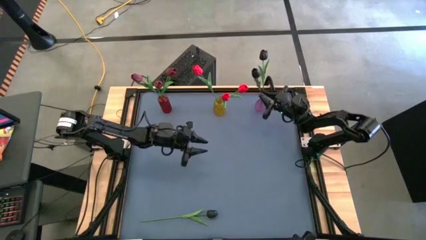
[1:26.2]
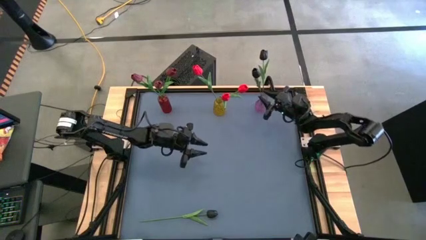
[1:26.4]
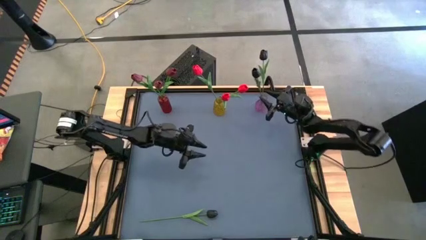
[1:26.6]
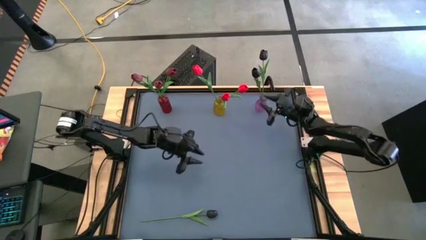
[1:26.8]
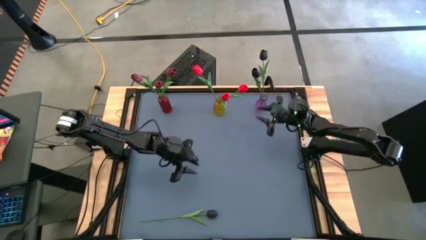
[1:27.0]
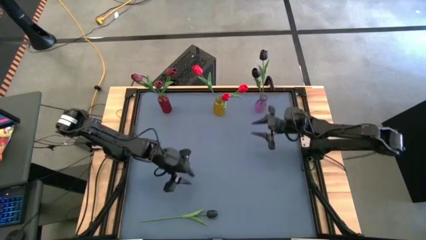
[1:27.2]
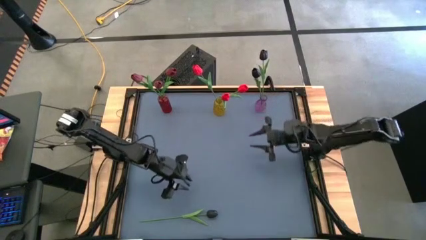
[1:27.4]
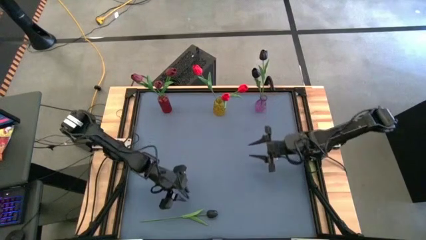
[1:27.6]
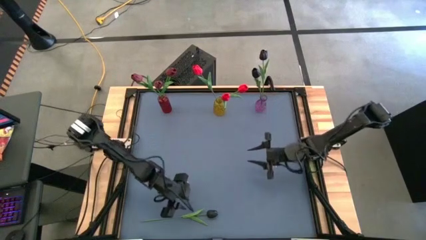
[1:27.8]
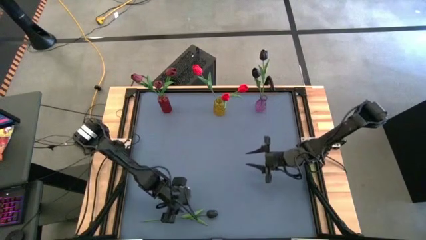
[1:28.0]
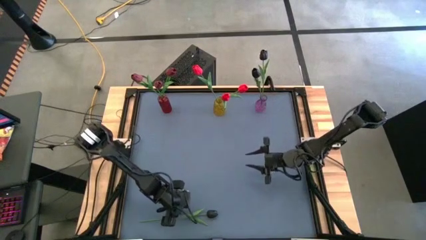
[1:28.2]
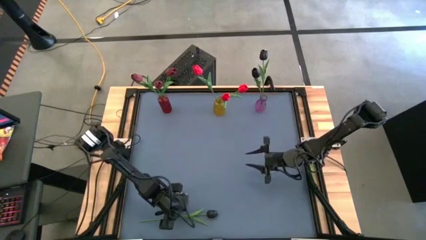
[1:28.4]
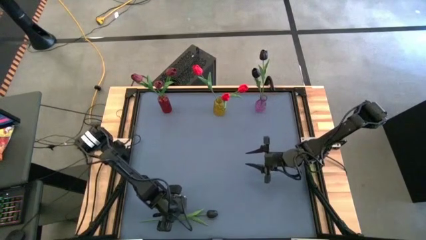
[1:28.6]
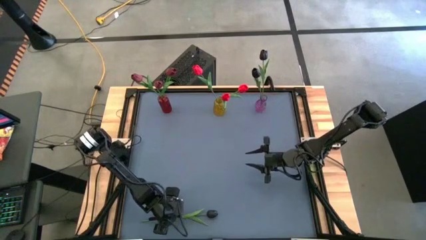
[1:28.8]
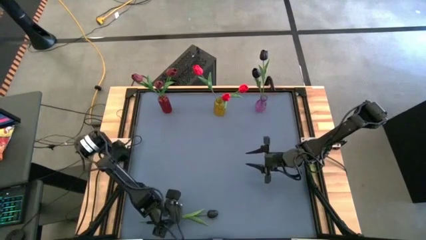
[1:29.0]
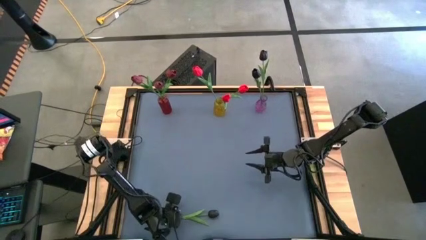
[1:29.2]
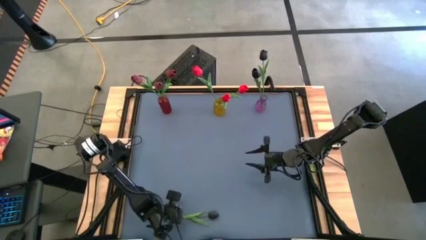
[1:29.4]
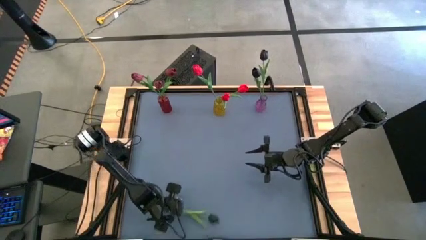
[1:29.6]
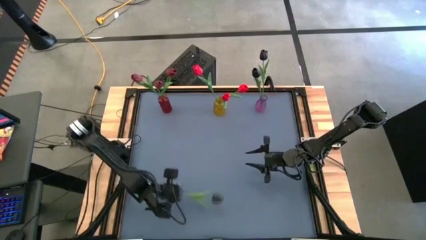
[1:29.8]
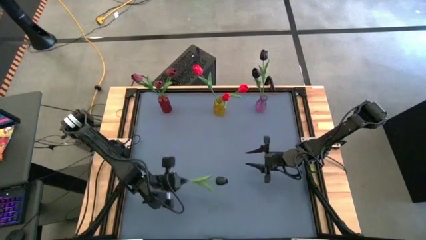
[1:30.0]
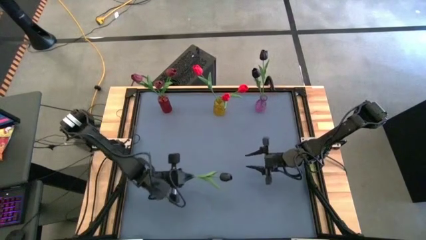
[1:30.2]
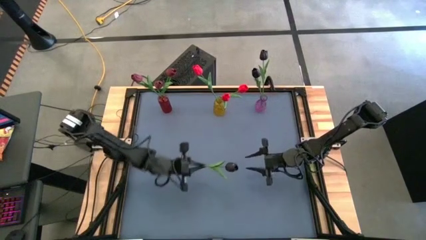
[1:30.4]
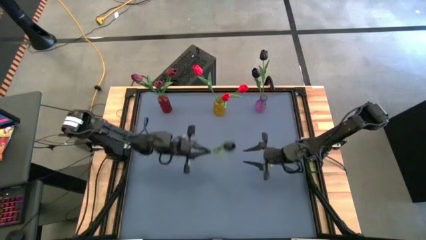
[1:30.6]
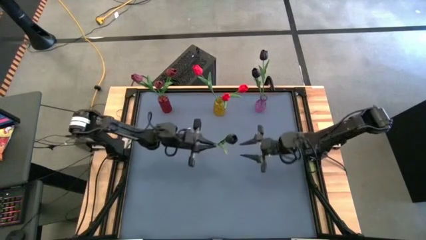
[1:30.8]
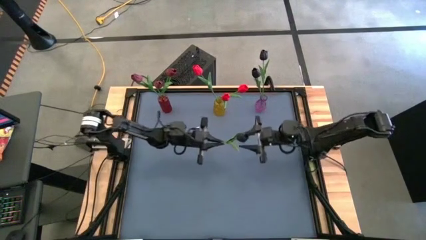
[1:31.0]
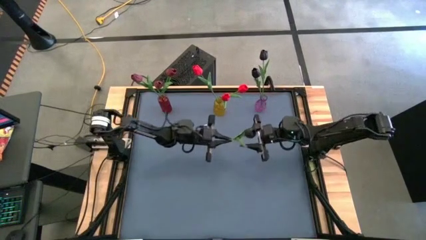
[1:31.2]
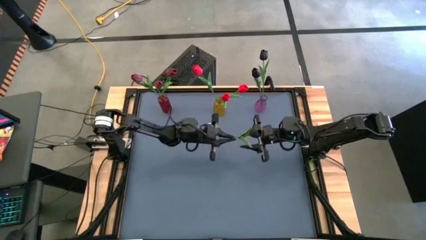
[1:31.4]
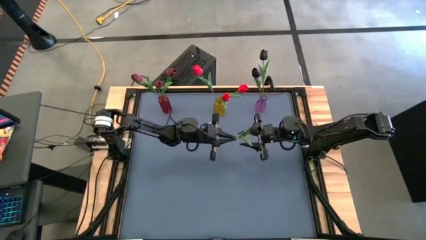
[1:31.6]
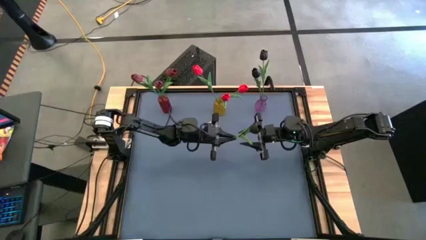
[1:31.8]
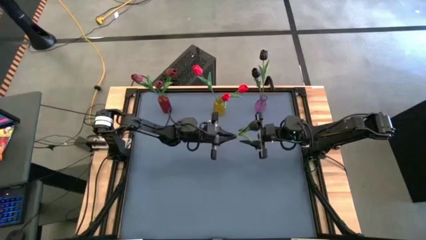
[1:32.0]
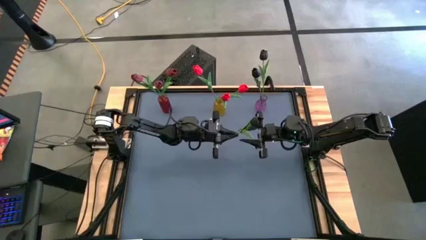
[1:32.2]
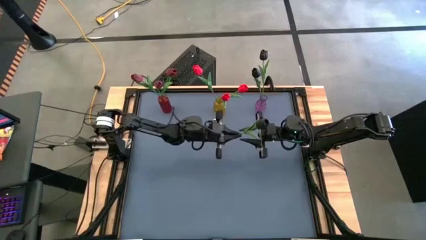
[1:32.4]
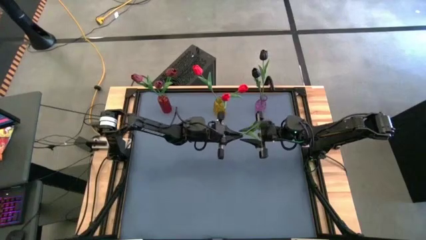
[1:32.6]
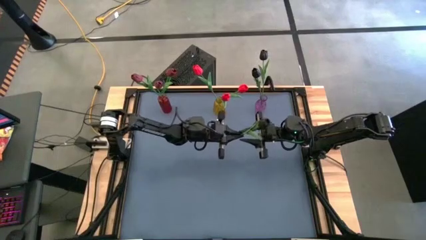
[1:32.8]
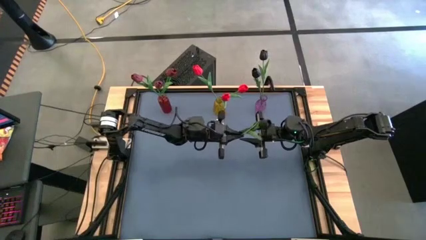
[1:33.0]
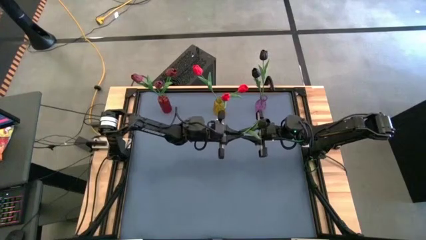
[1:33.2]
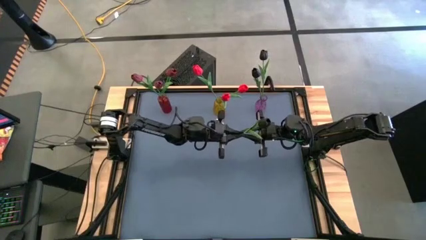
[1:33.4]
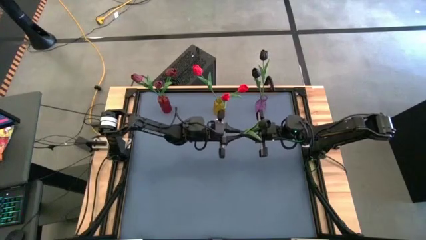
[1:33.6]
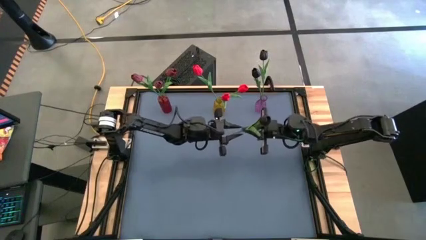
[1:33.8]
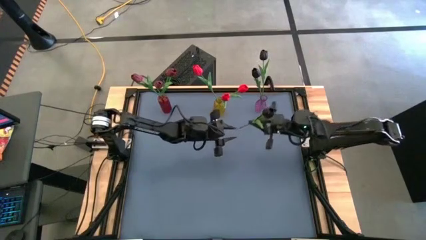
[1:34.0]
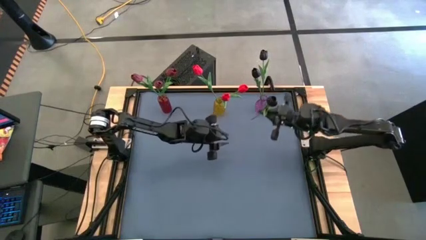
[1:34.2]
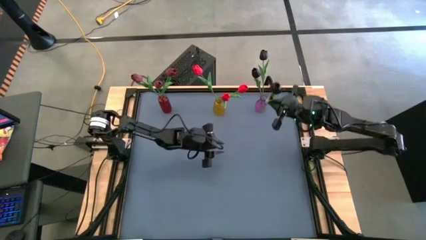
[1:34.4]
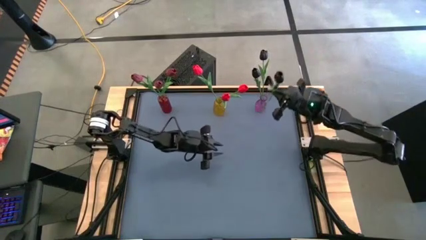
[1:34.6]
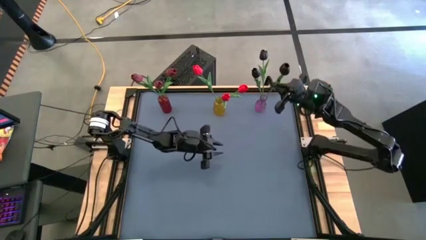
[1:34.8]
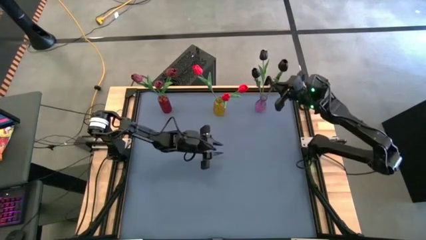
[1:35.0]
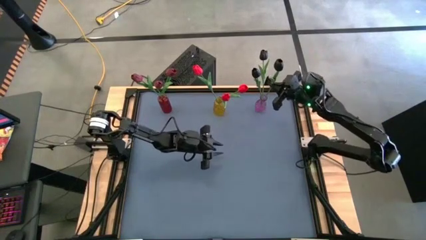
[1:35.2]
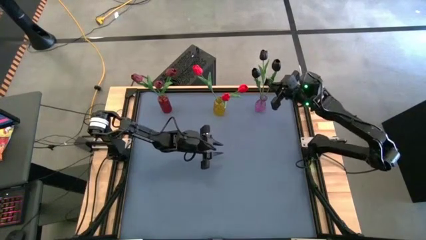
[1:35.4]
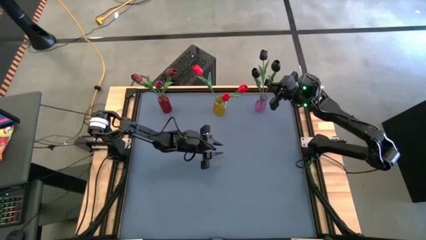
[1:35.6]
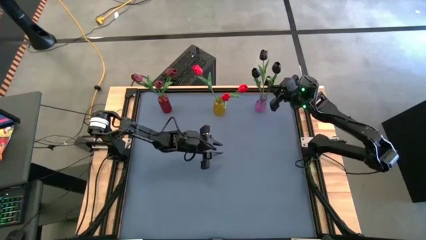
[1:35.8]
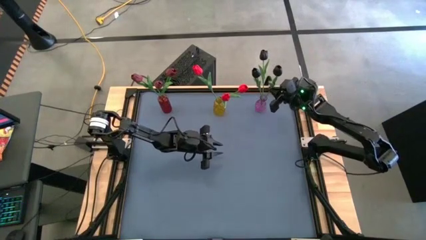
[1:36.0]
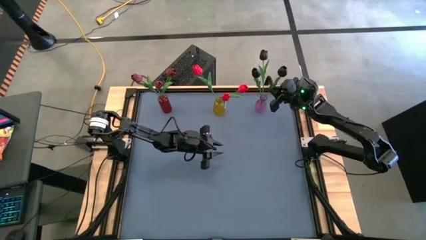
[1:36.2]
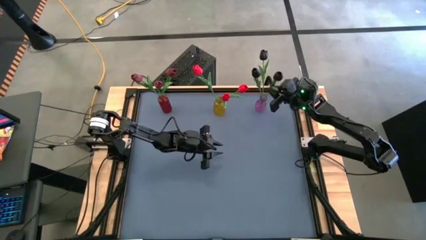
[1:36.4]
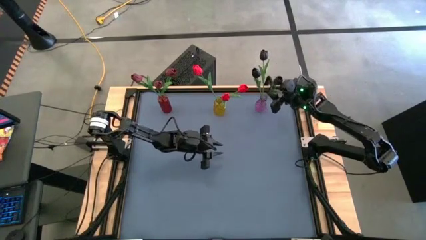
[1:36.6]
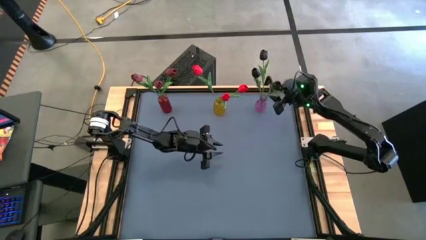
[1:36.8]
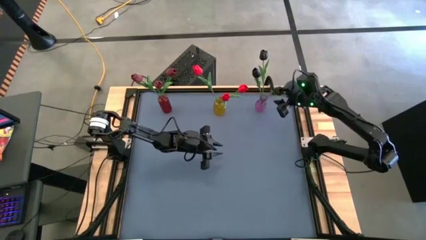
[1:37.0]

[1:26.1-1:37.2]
Task: Sort flowers into vase by color
Put the black tulip into the purple vase

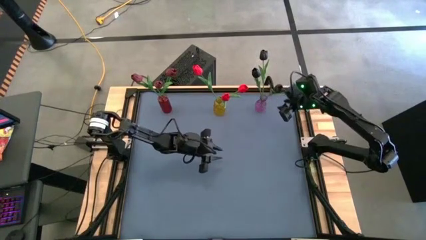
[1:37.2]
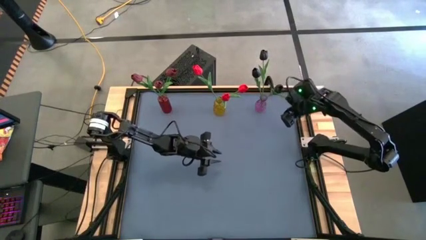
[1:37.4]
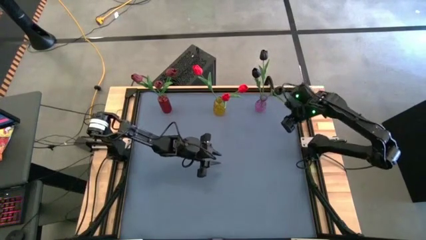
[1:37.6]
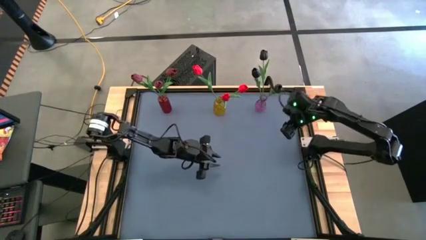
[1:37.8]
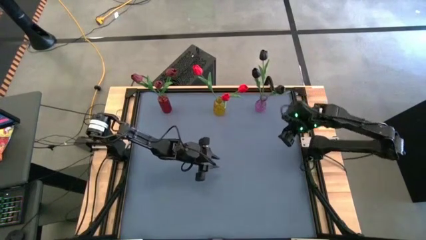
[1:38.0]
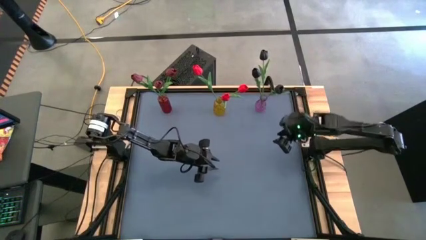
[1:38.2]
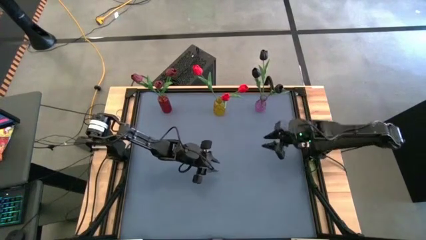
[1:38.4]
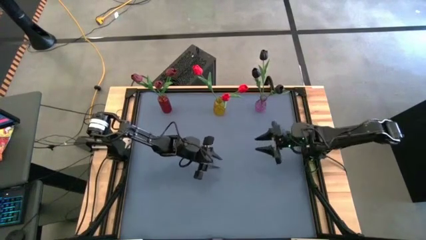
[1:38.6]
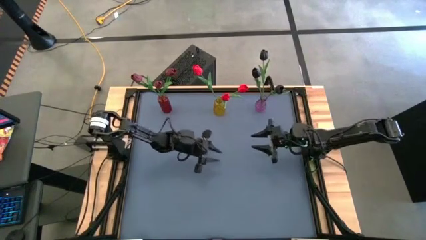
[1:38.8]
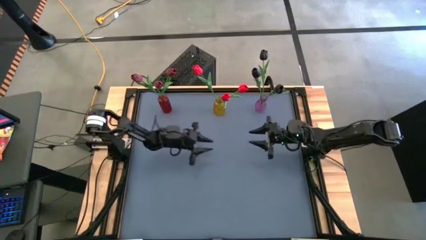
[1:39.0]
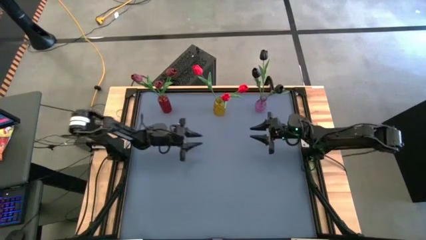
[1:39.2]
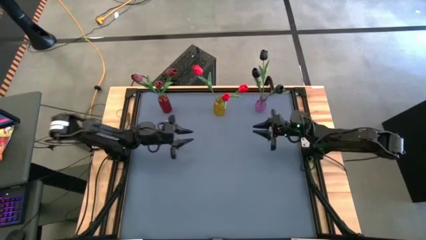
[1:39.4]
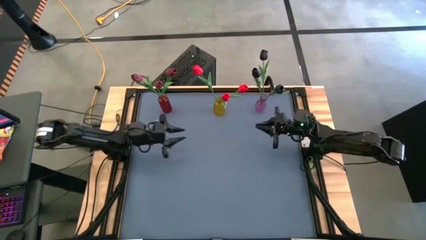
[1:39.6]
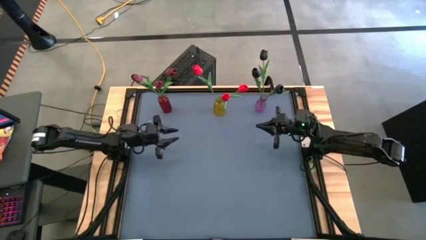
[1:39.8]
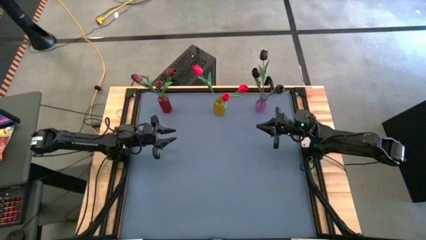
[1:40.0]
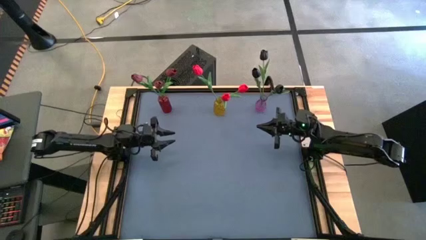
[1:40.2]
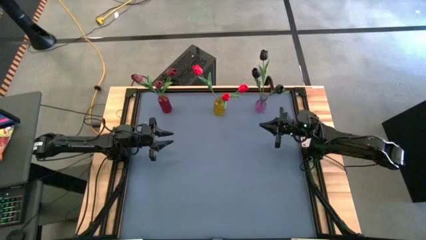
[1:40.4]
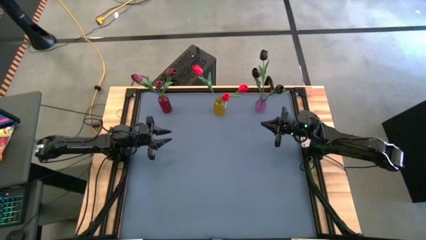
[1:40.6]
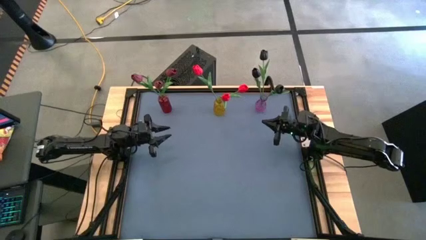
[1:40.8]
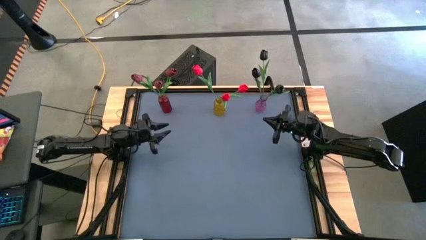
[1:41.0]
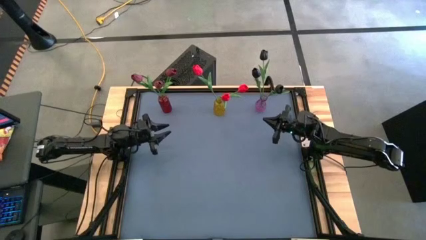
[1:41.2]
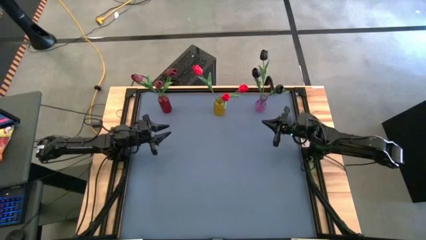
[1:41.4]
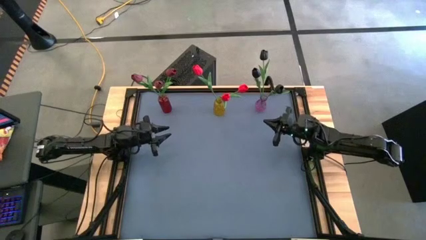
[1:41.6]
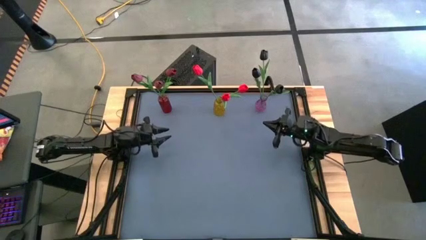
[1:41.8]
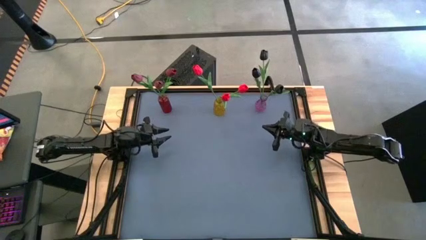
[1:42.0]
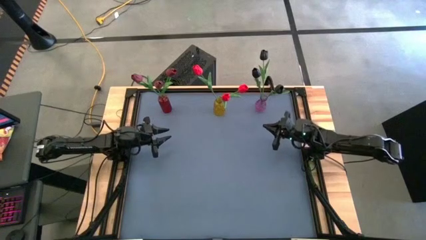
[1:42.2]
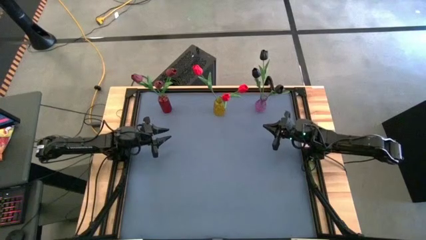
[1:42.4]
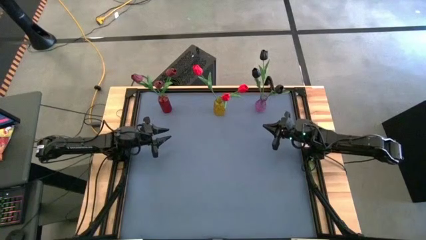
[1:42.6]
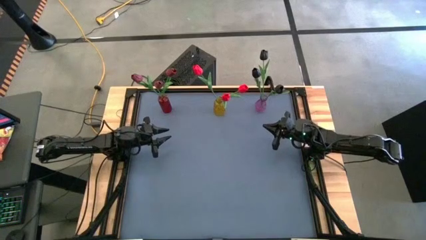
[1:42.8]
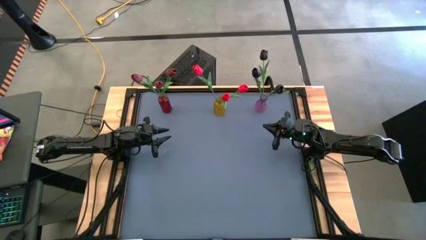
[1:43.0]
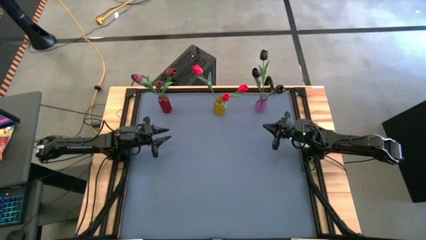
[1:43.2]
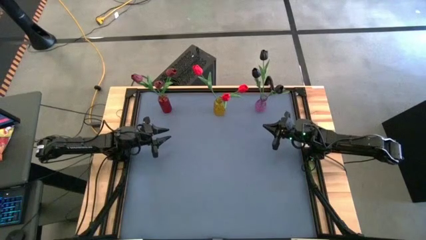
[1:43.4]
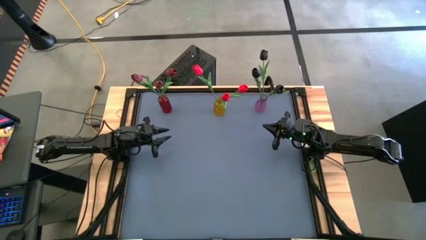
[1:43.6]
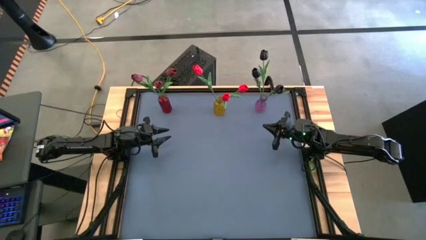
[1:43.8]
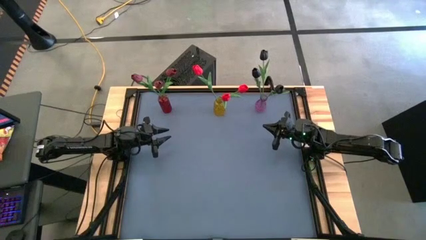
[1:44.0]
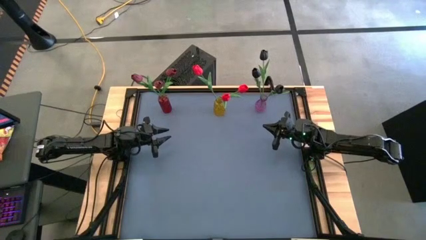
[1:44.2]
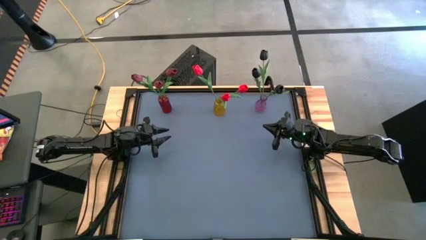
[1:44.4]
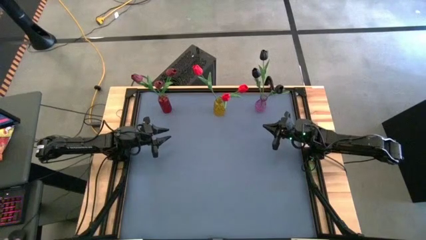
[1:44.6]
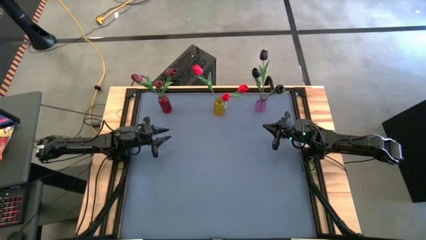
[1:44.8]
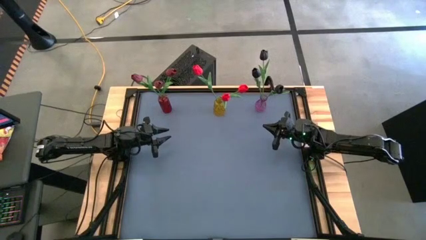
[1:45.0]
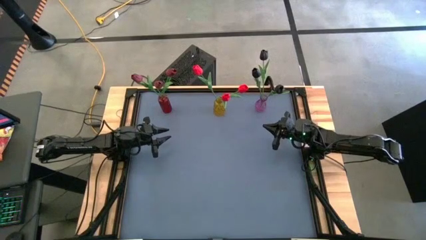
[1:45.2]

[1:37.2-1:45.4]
Return to Home Position
